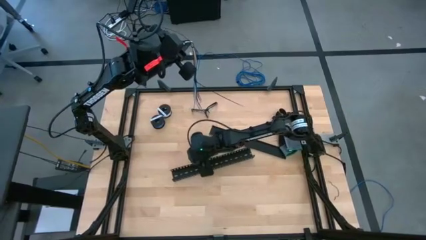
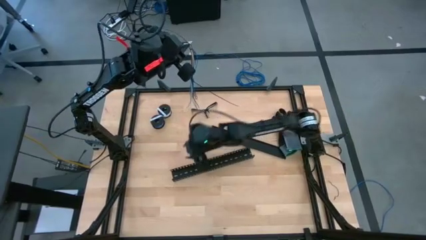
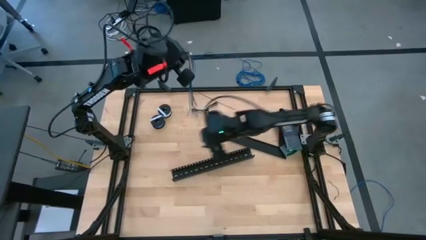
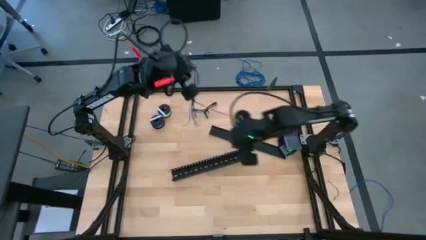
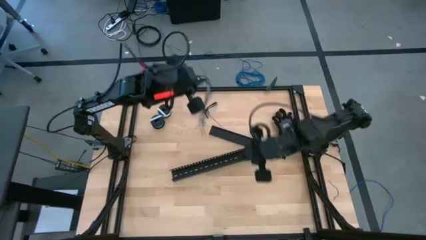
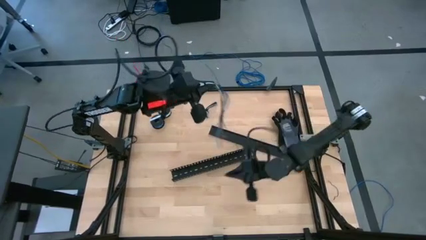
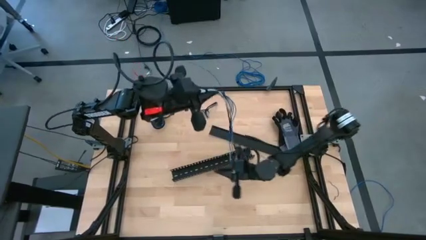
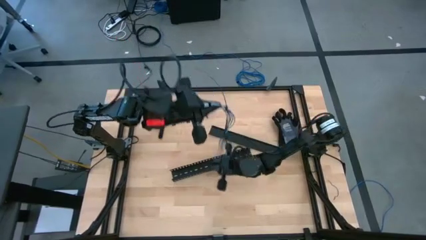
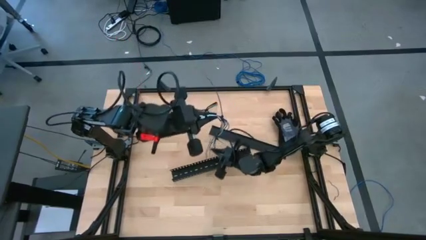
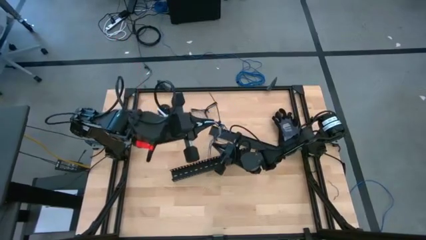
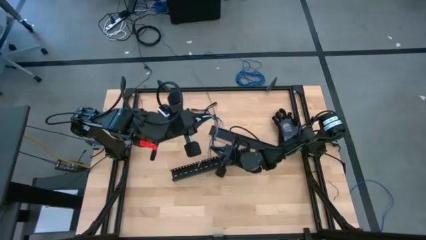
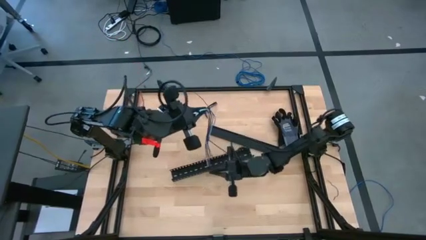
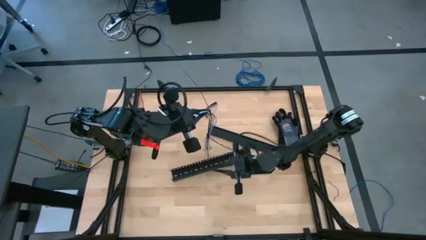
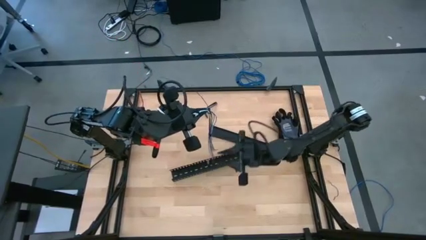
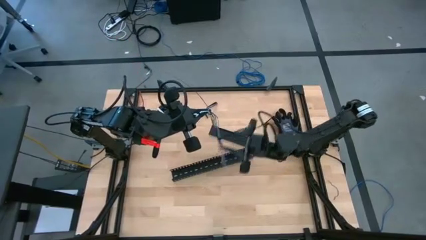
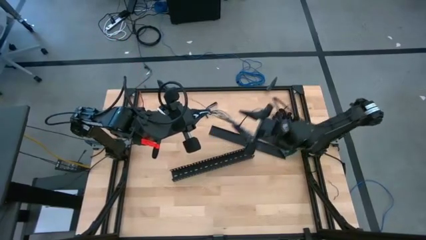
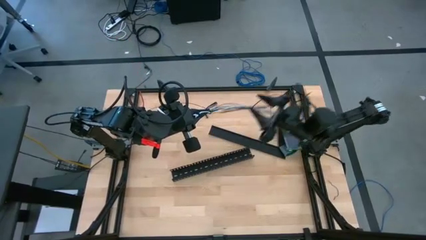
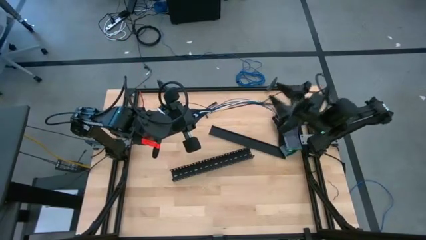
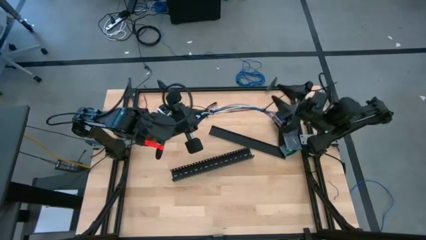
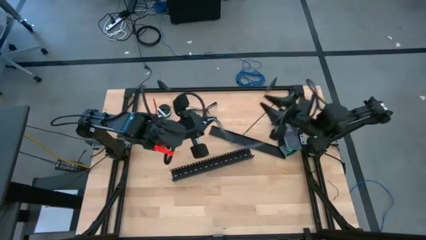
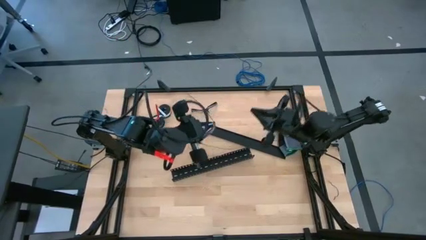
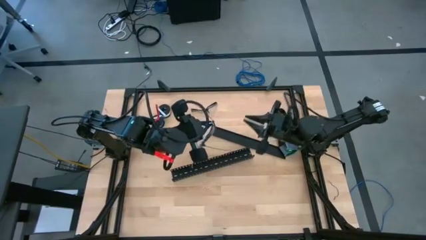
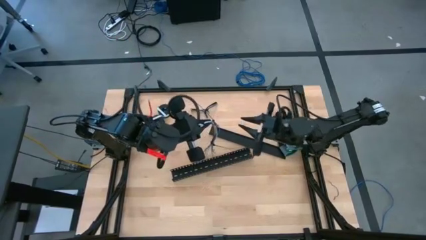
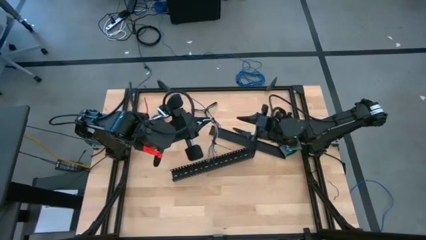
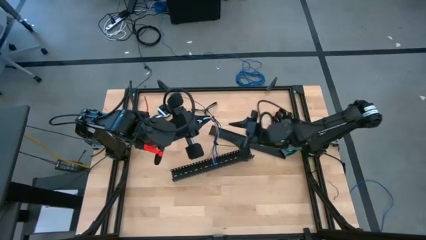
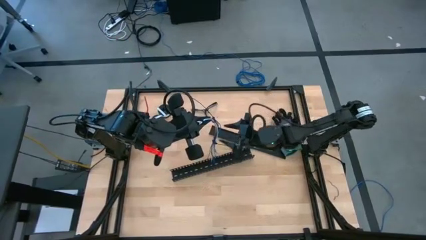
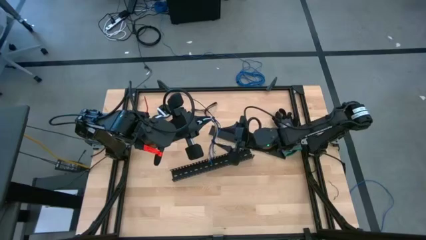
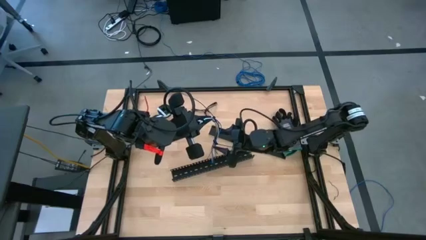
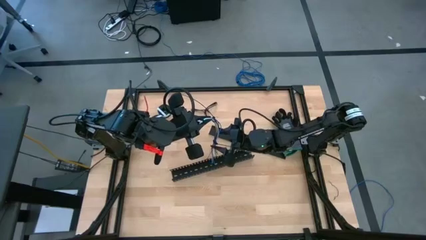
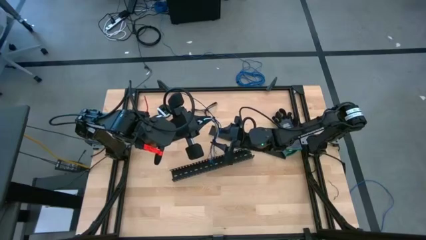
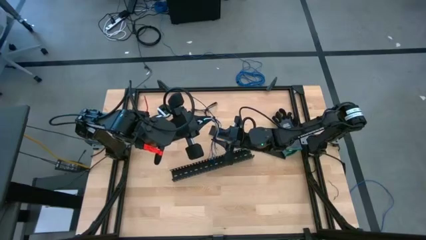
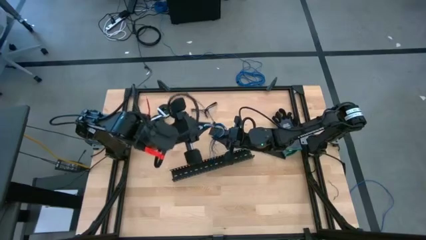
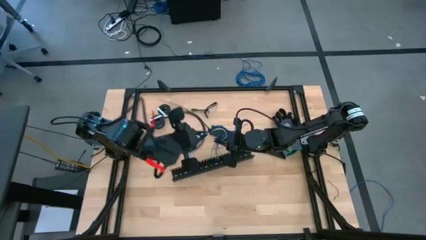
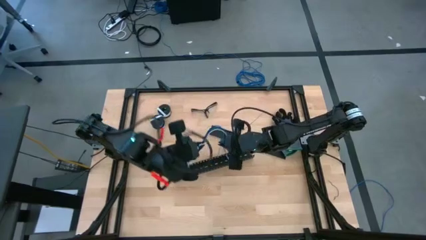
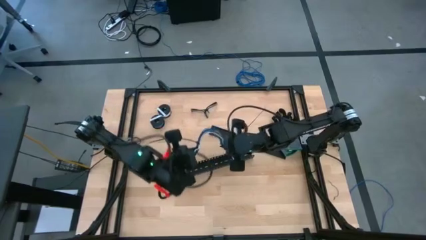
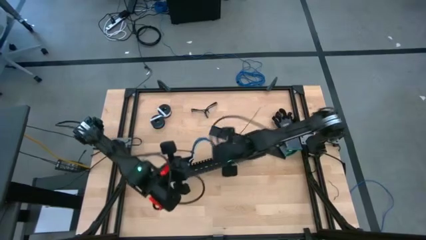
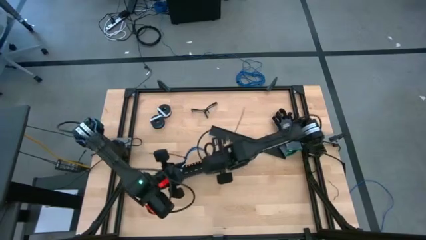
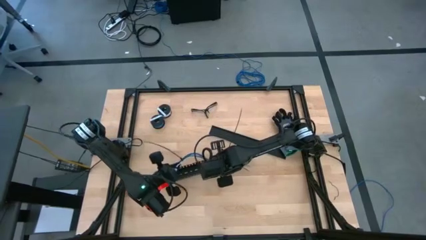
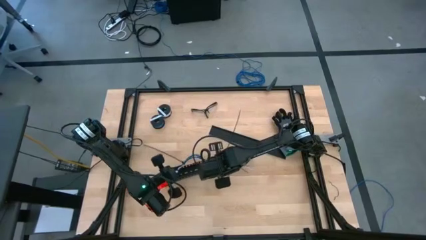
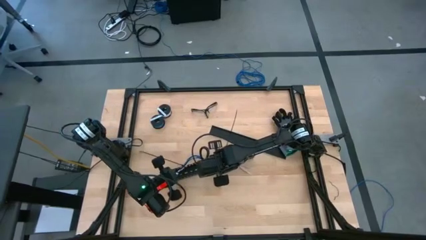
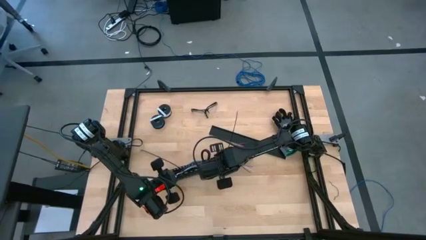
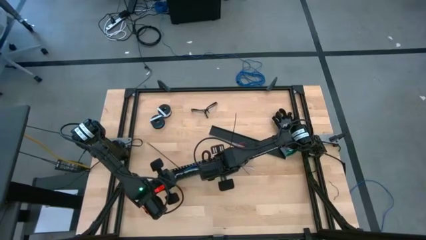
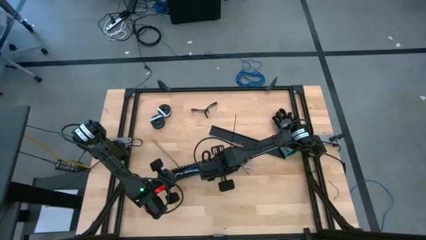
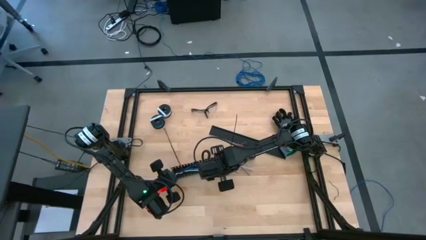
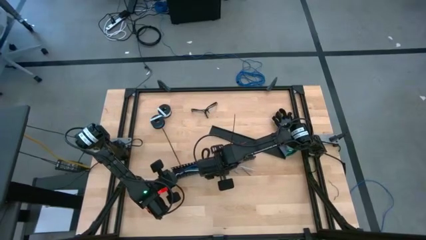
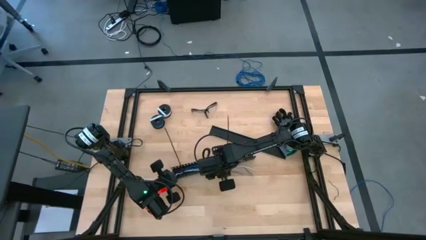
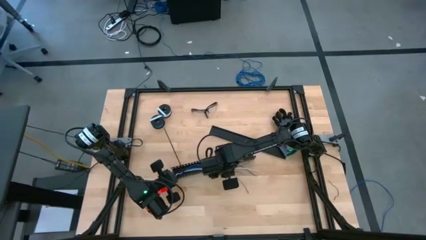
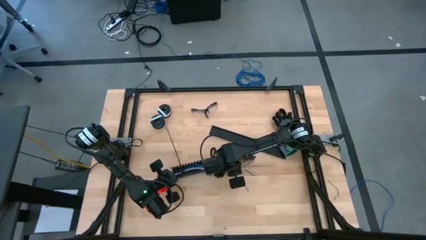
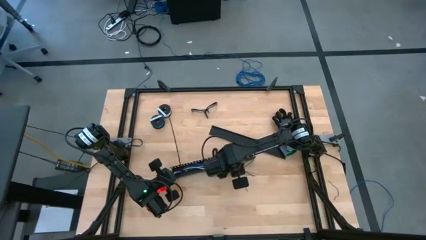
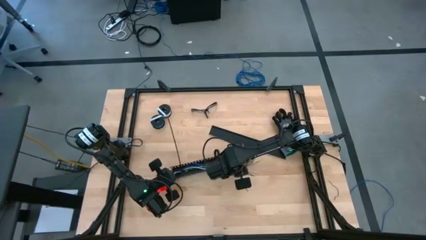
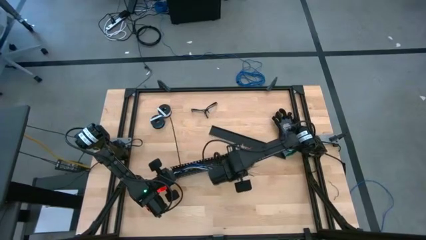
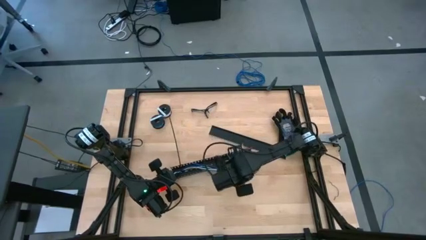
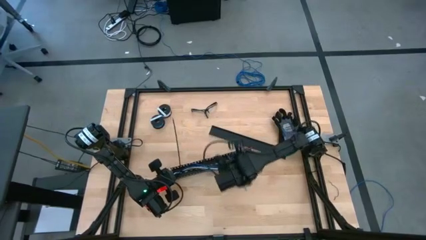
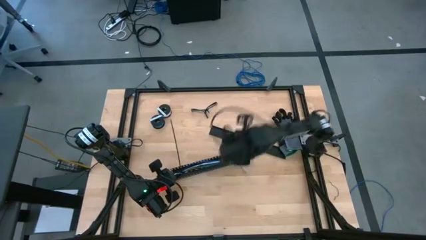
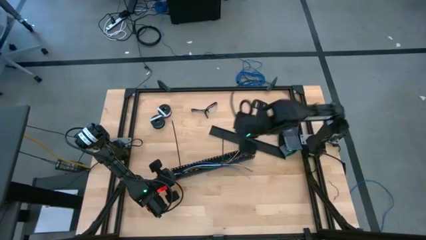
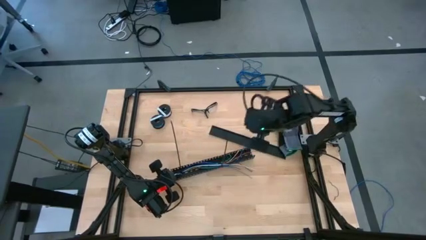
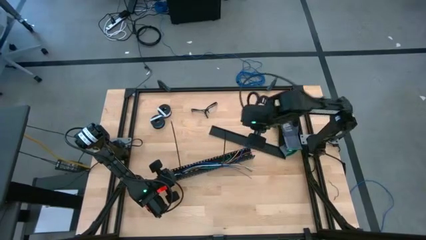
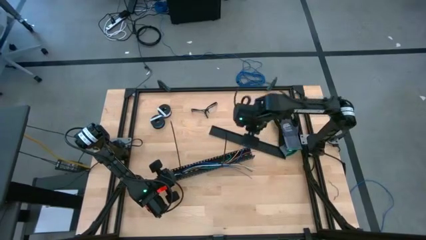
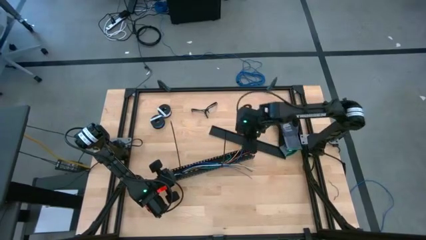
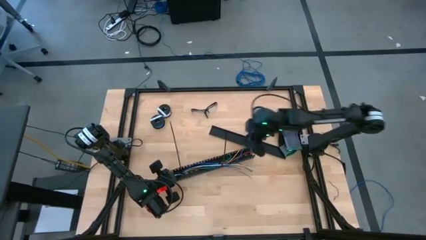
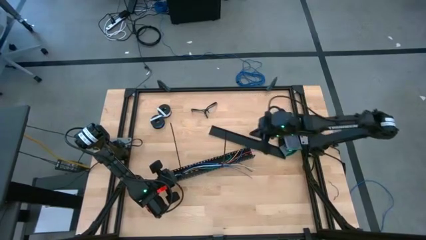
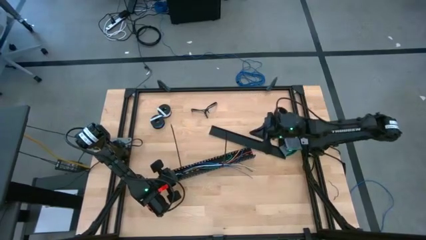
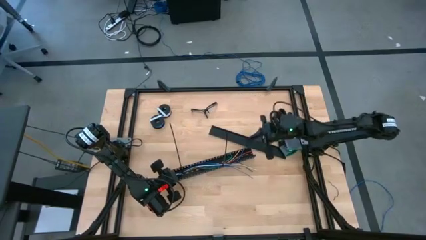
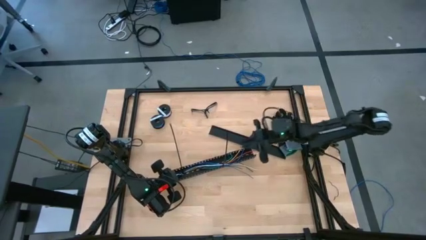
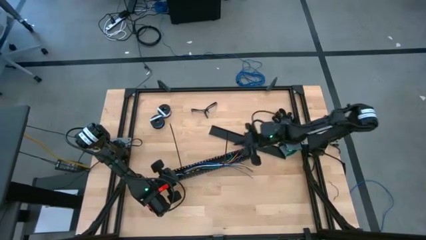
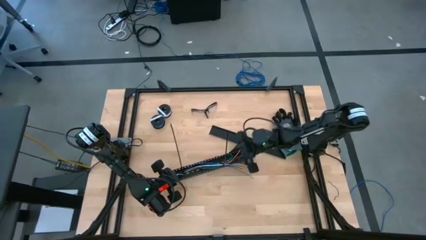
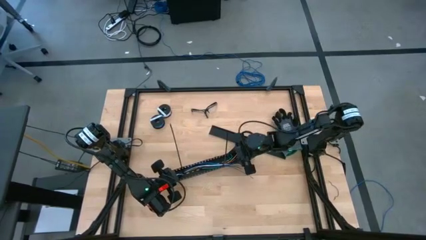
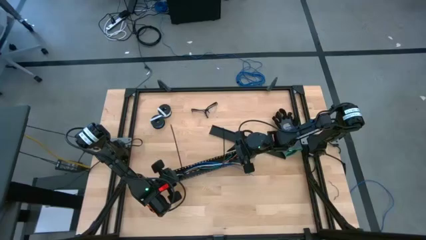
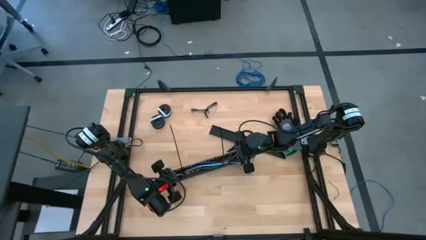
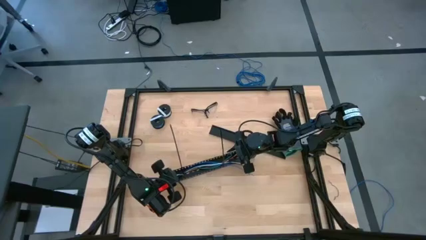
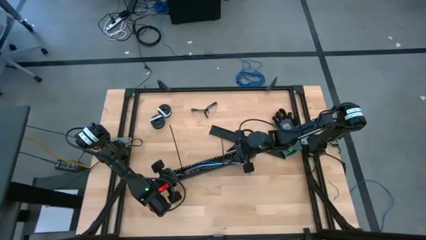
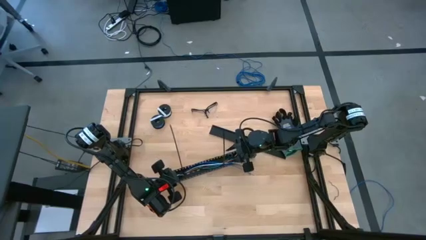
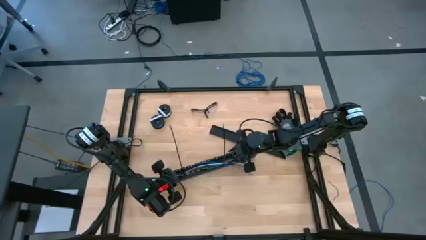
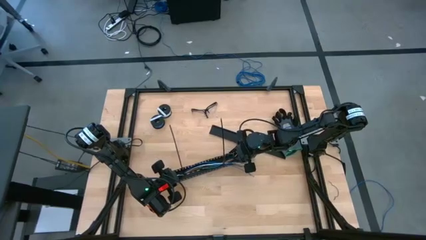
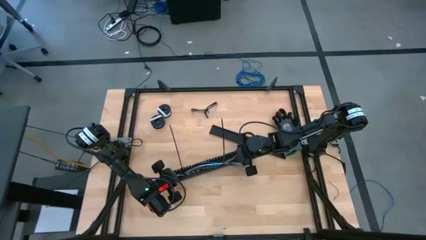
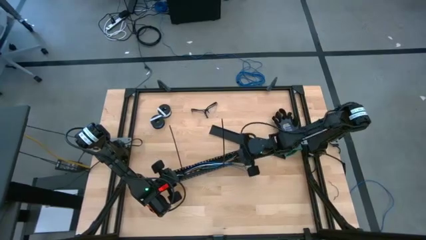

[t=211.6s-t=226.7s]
Task: Ziptie cables
Put the wrapped cables into the black cable duct

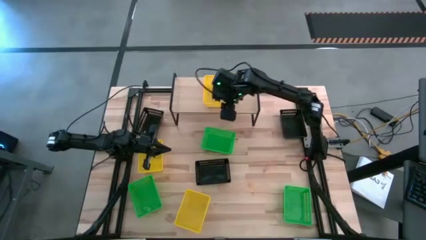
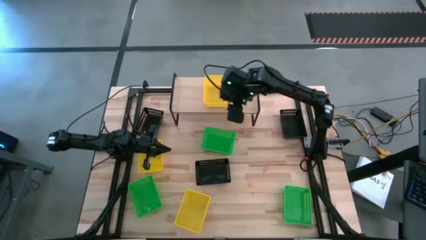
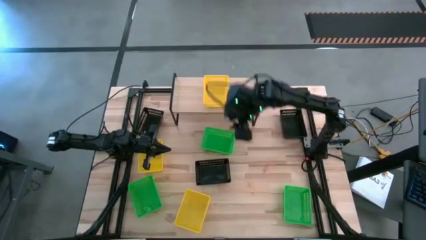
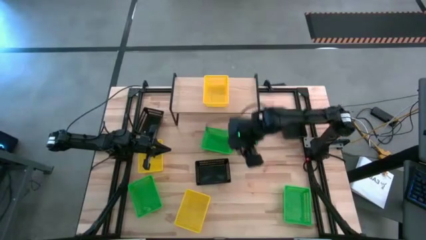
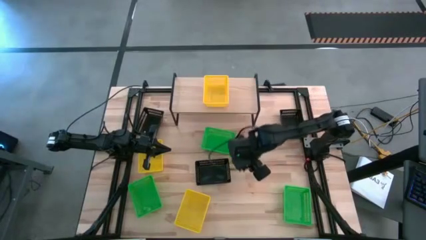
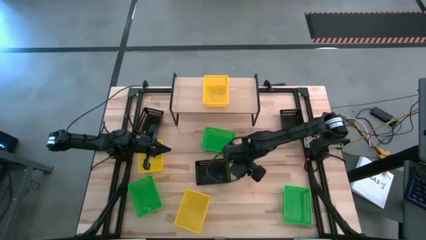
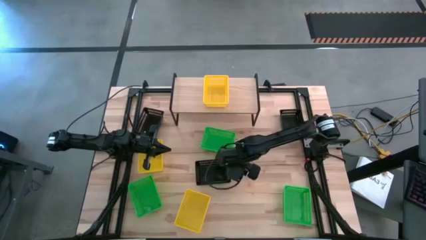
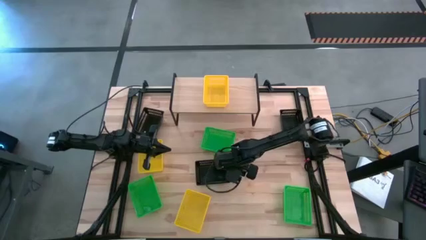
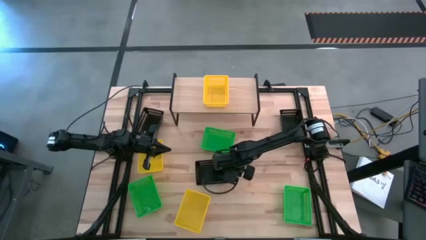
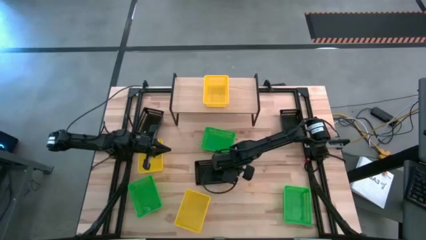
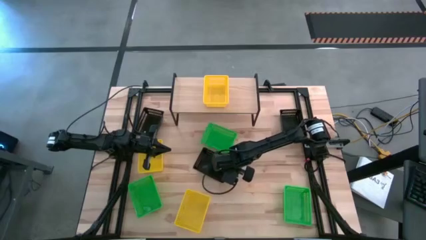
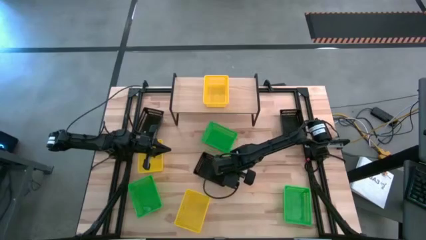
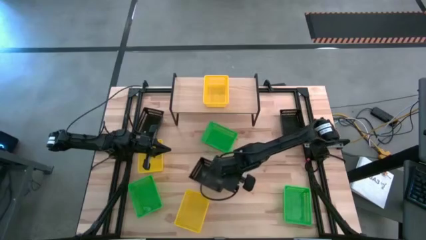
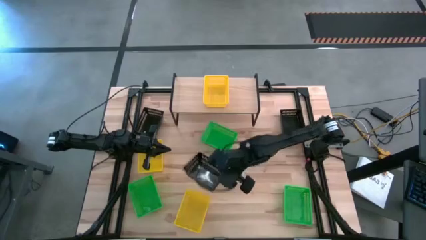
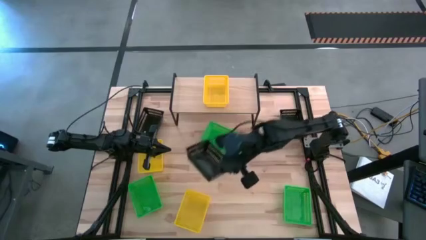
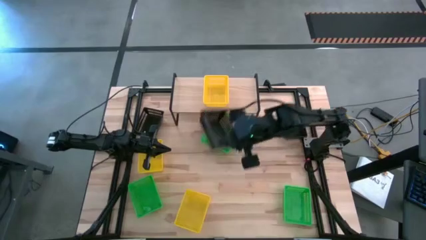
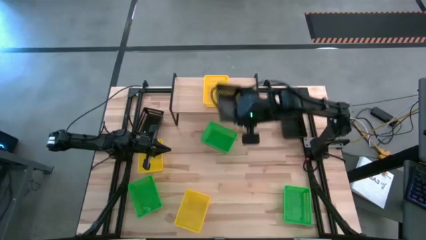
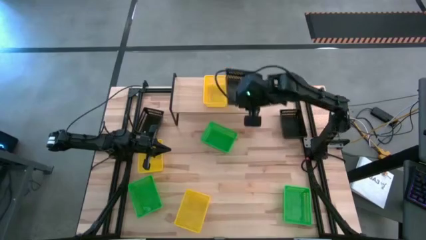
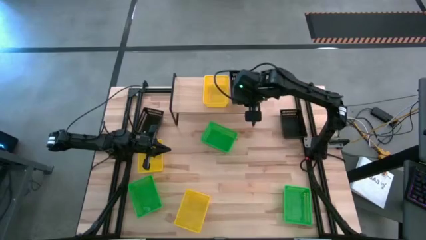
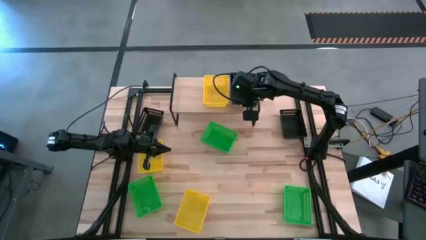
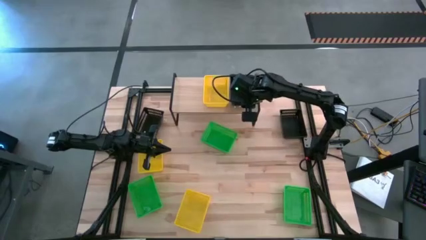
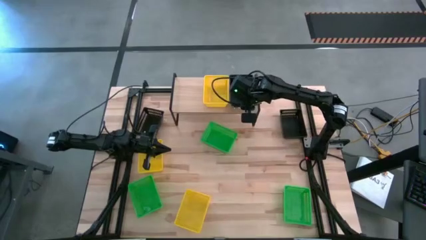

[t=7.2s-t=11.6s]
Task: Stack baskets on shelf by color
Put the middle black bin on the shelf
